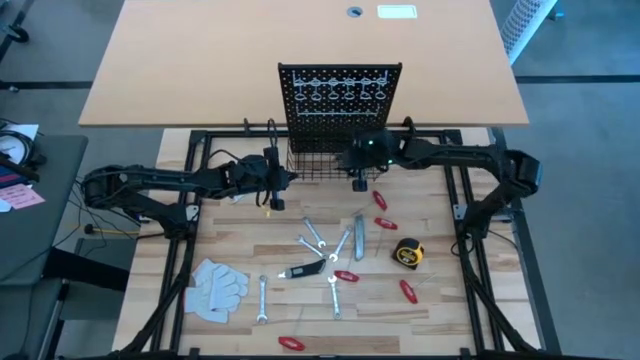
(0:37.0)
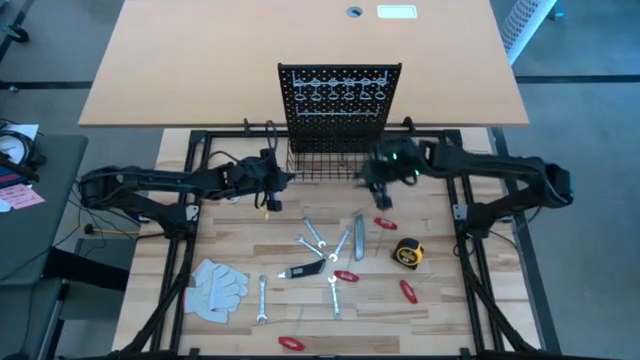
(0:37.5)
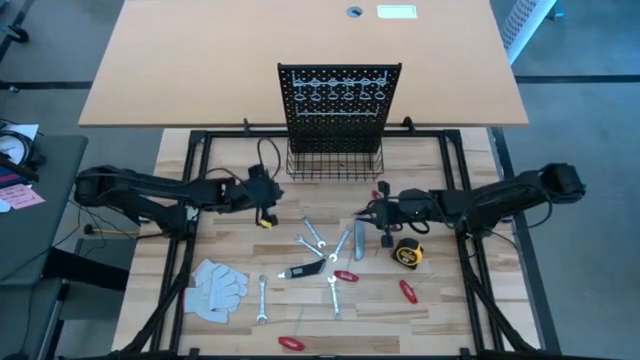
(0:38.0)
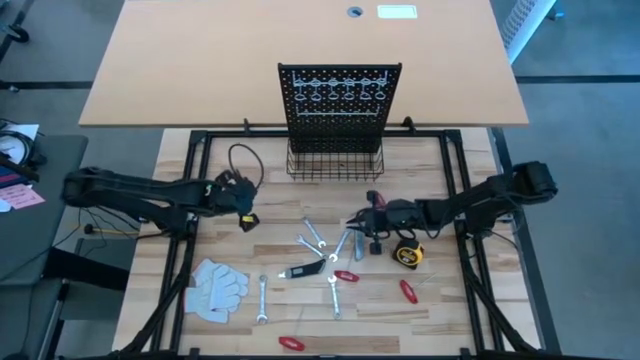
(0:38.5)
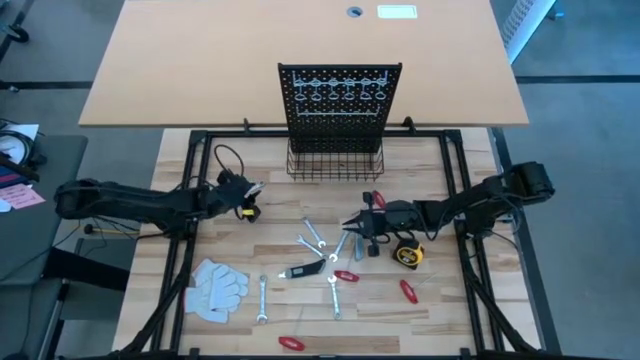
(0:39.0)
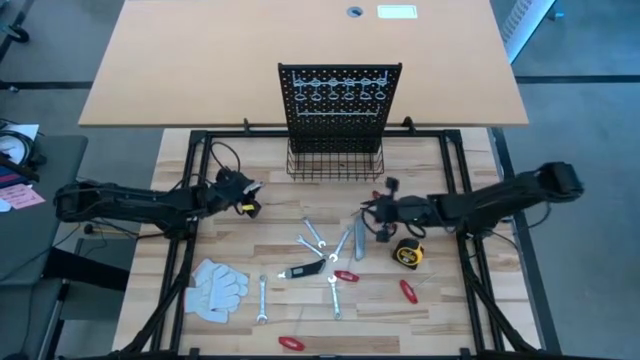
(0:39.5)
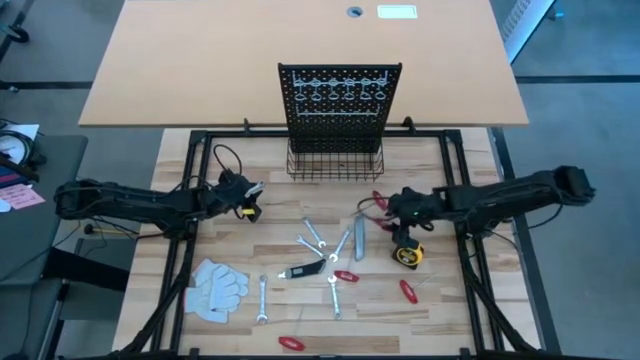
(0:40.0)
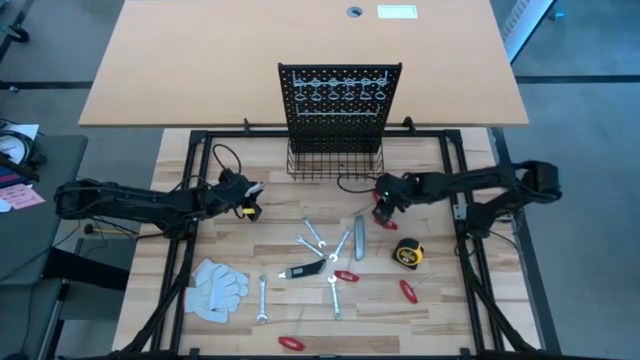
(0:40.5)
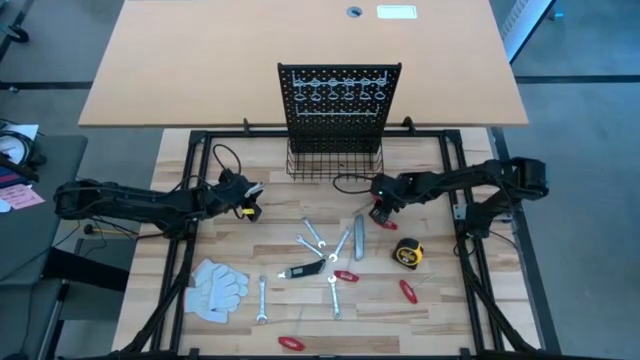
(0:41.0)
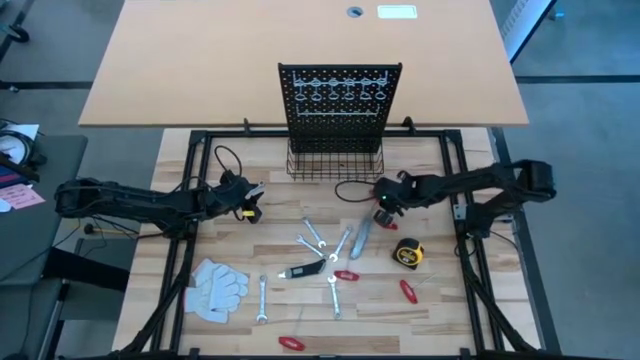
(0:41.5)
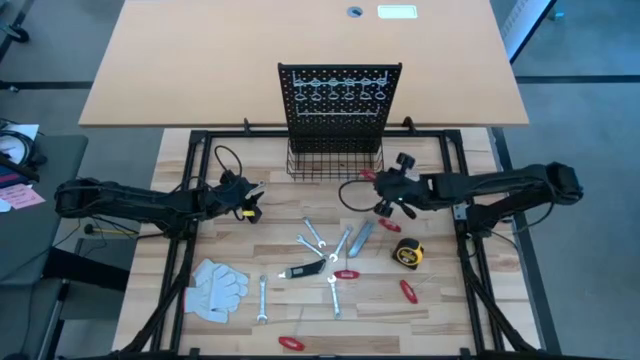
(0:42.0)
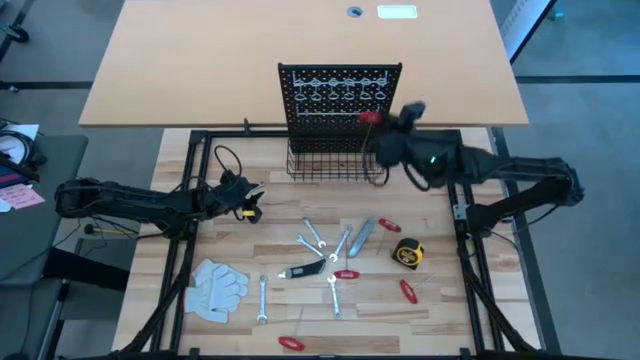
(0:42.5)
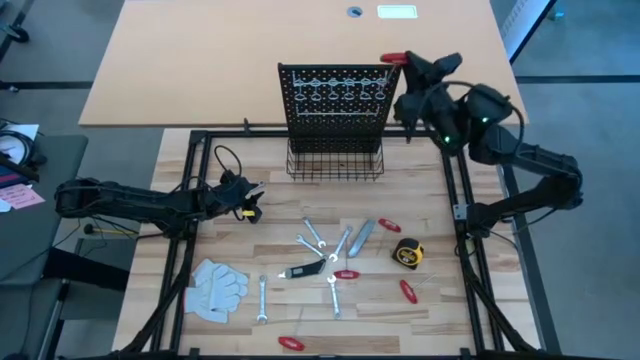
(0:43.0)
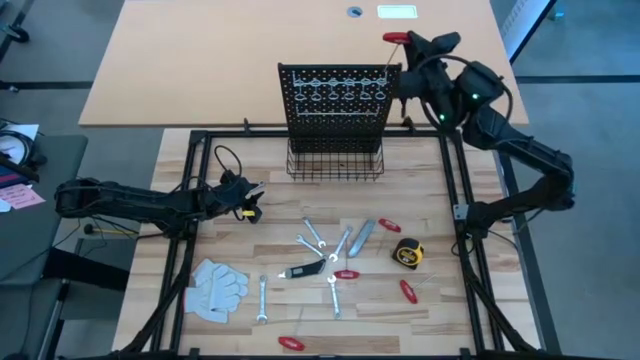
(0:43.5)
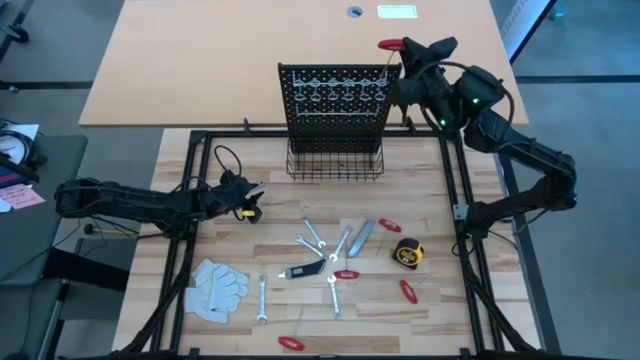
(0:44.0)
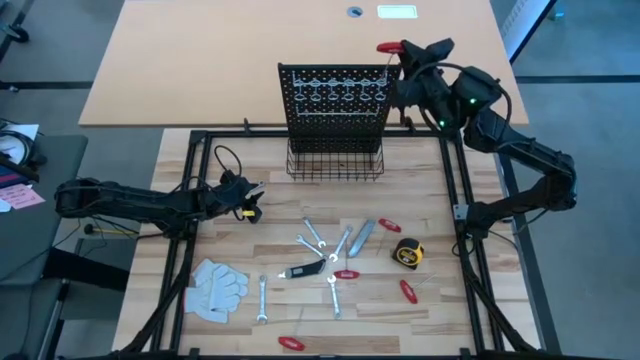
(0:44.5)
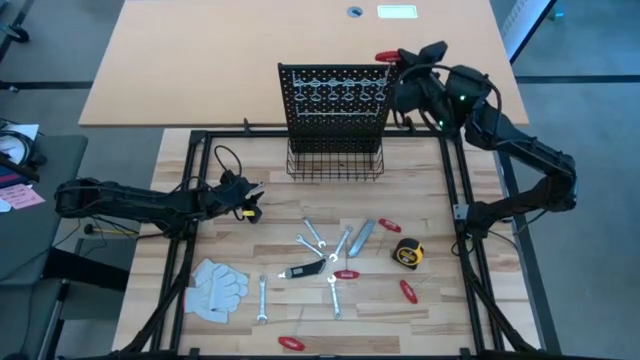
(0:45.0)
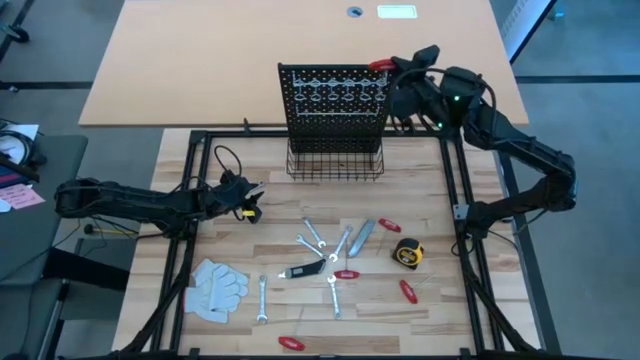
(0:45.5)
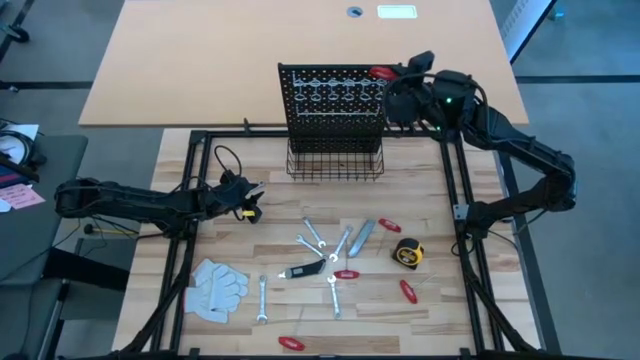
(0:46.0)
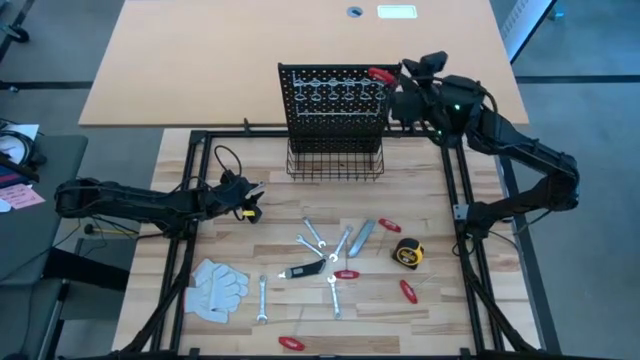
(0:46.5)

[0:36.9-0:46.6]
Task: Hang tools onto peg board
Hang the red allen wrench on the pegboard

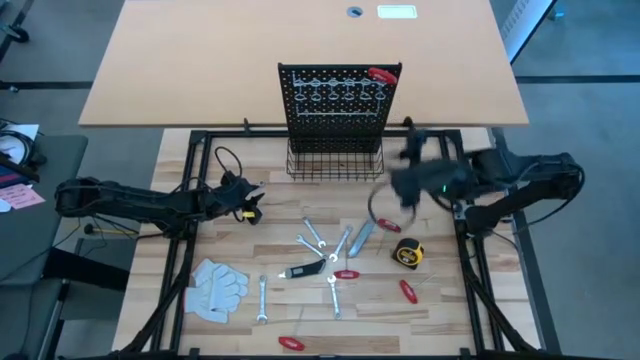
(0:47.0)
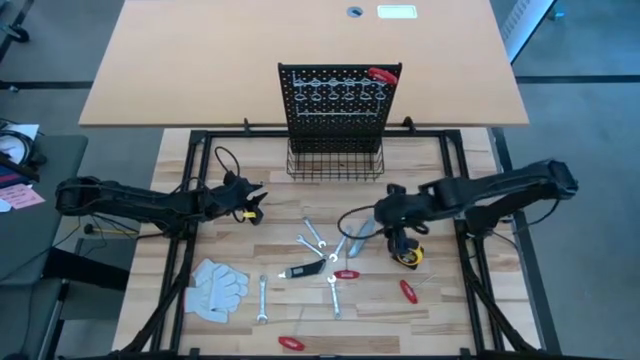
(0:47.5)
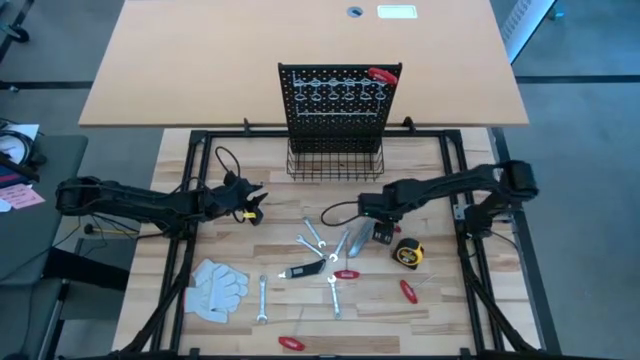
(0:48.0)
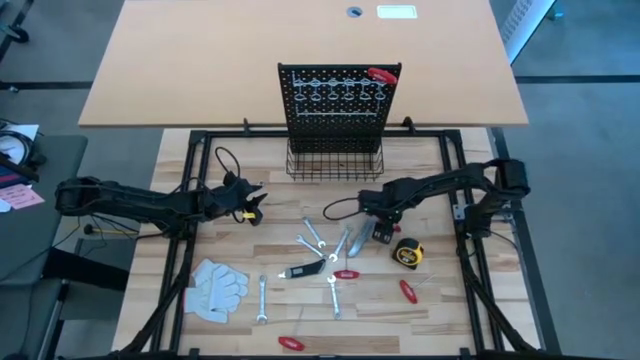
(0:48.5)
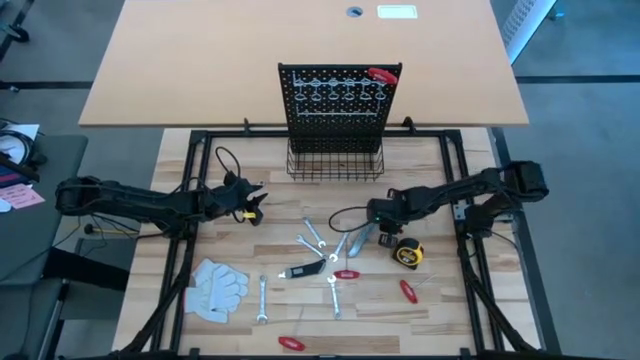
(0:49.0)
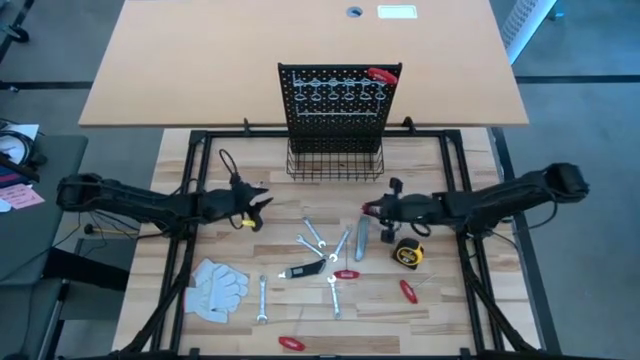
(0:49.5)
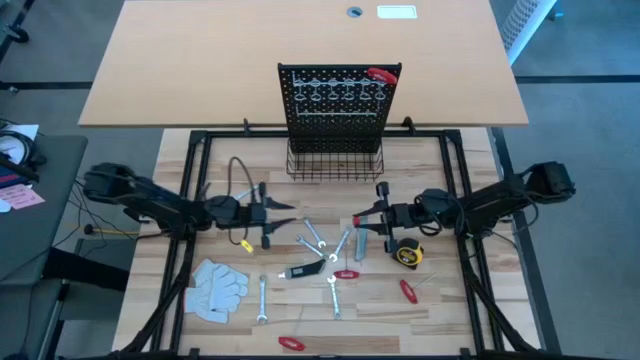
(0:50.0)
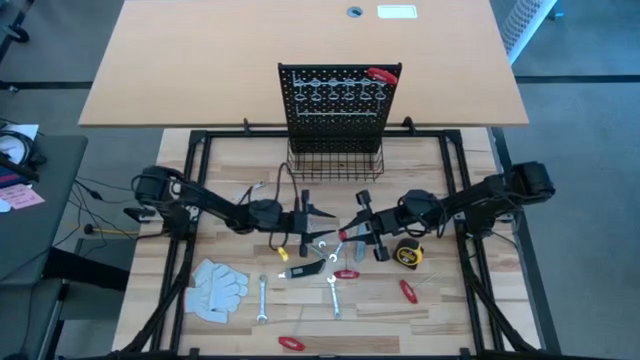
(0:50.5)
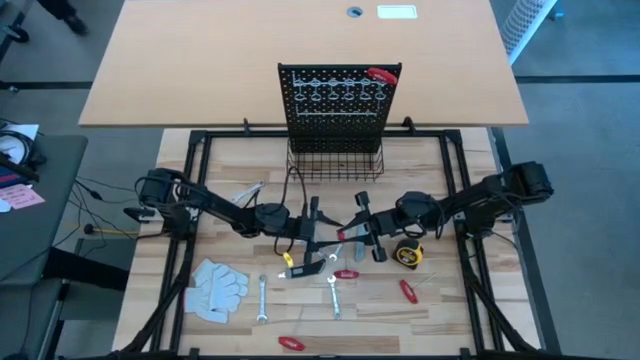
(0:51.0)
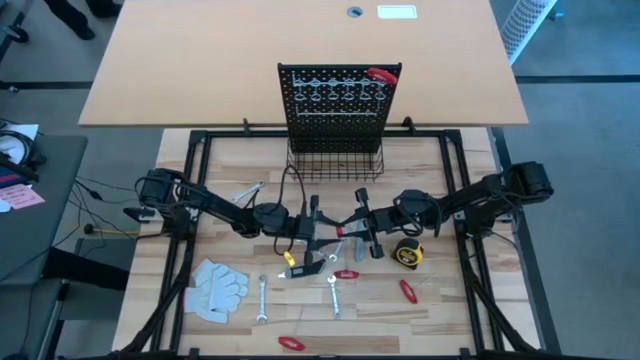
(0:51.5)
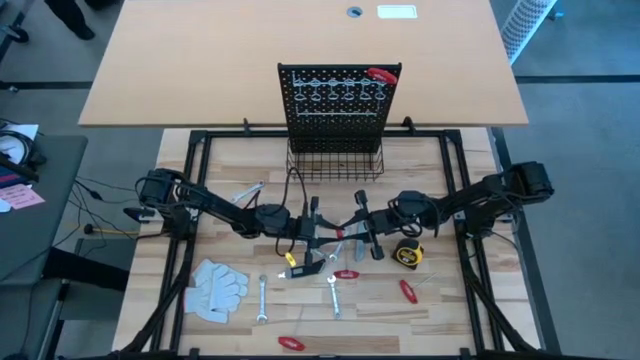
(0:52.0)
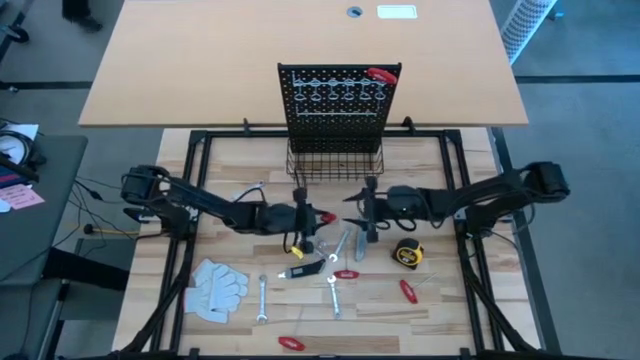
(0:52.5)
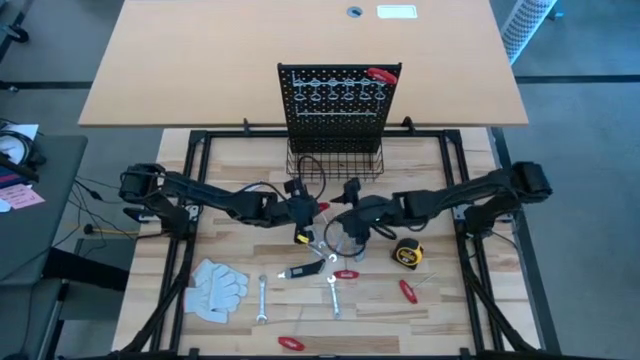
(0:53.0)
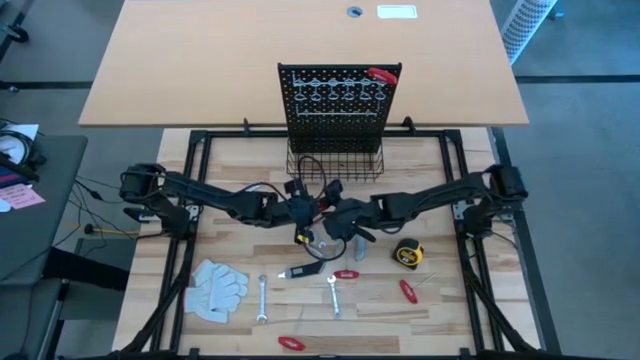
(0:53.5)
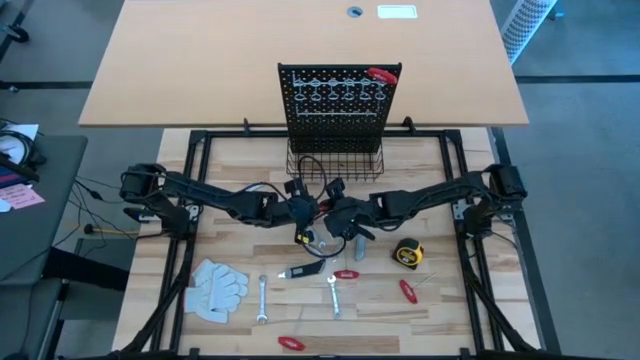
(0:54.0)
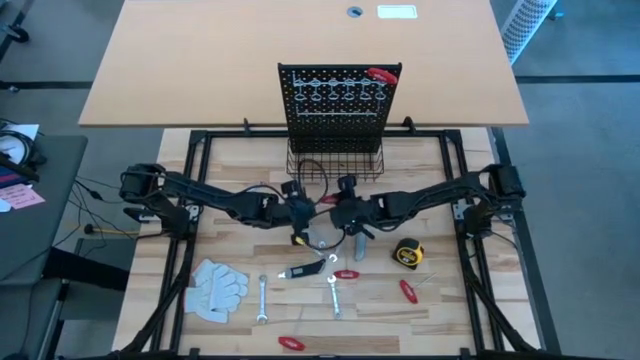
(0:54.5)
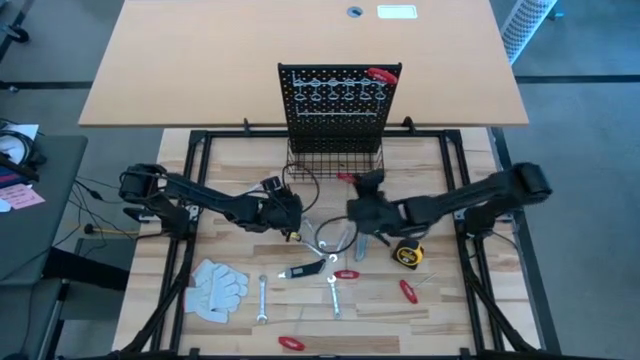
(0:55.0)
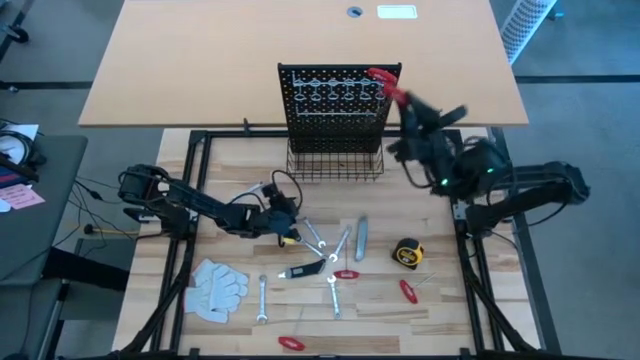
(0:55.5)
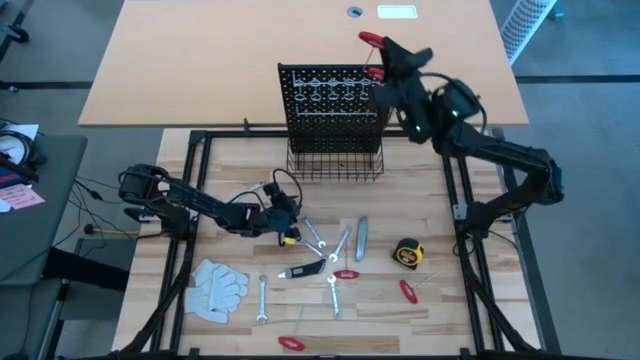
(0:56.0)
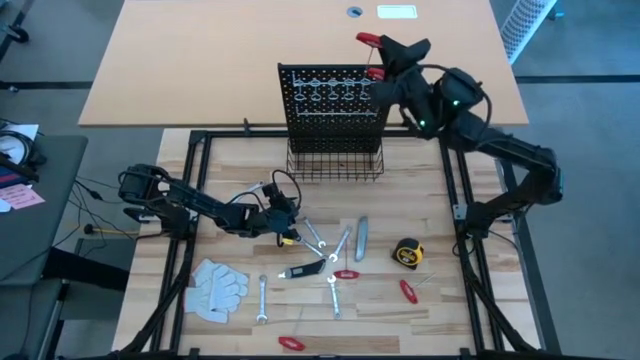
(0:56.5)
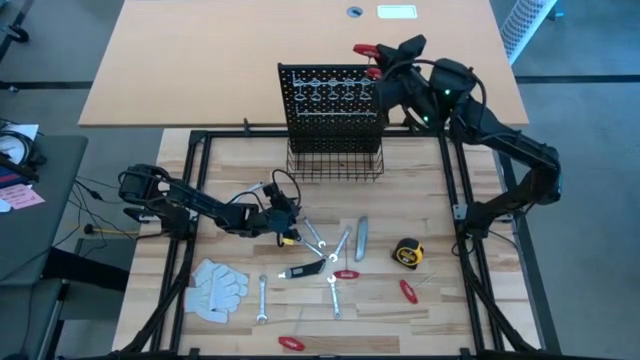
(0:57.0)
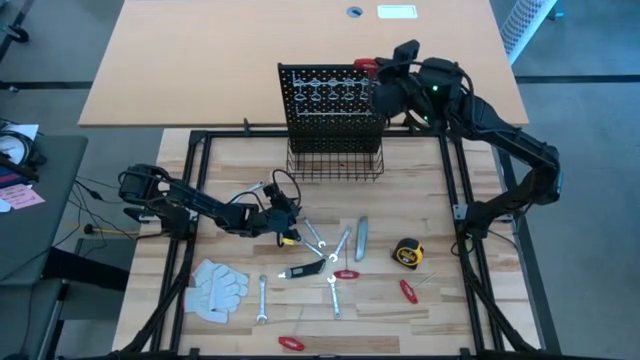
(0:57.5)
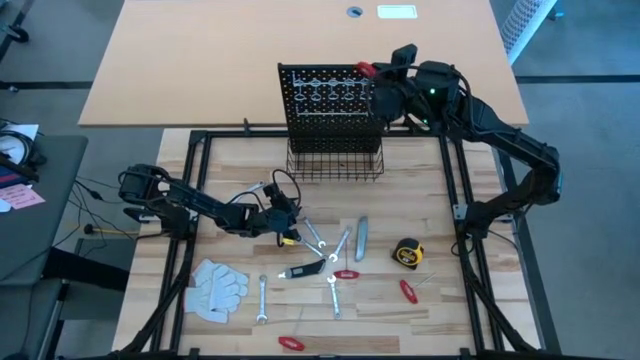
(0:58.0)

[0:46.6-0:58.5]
Hang the red allen wrench on the pegboard

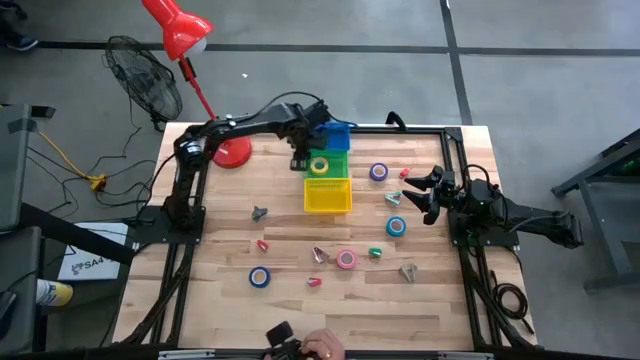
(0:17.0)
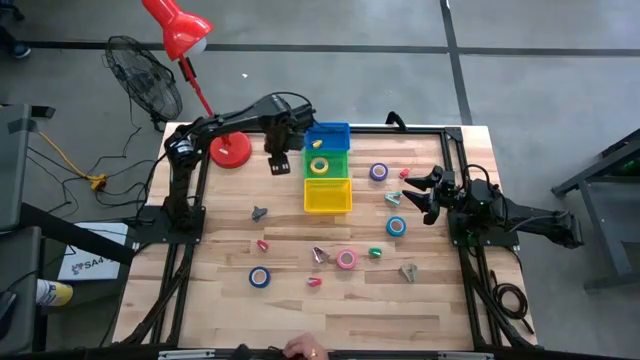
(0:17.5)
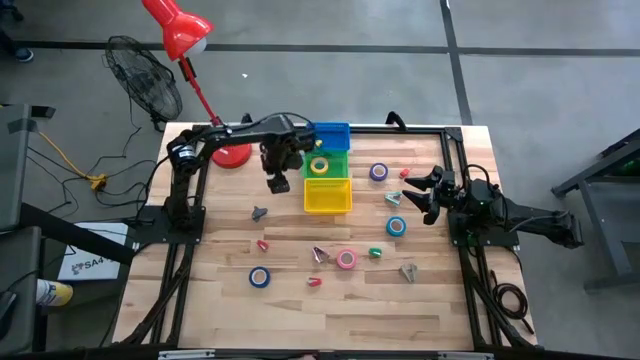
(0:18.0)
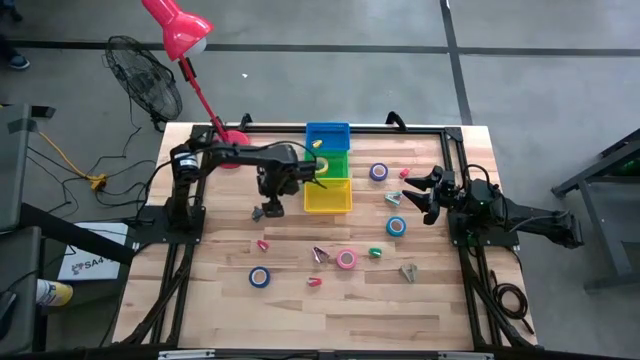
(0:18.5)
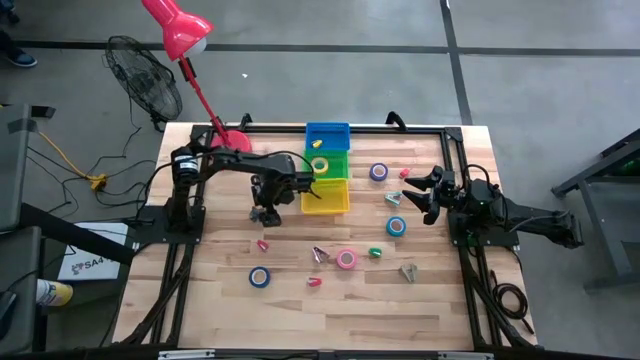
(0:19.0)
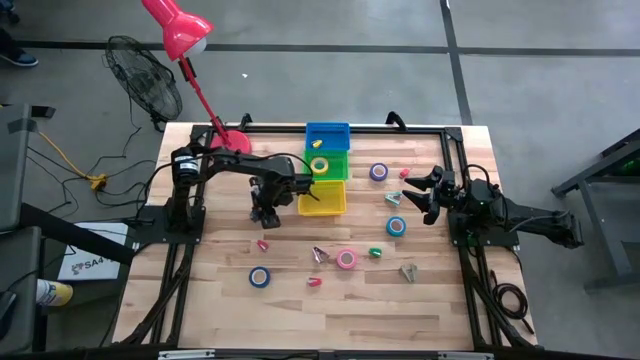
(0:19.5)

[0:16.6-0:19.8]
Task: Pick and place Stapler, Stapler remover, tape
Put the black staple remover into the yellow bin
